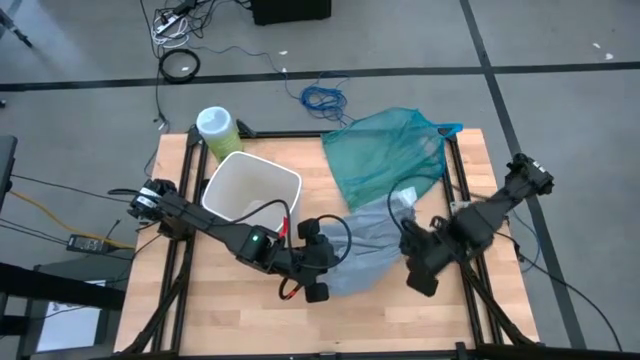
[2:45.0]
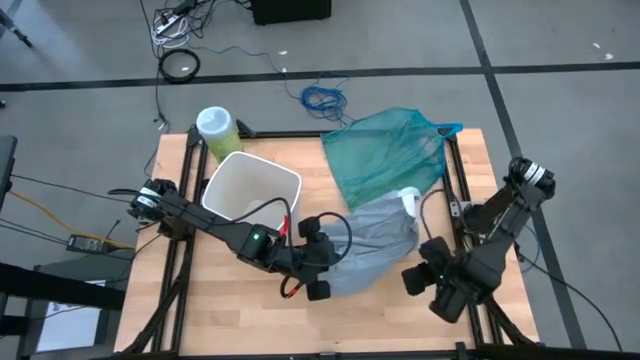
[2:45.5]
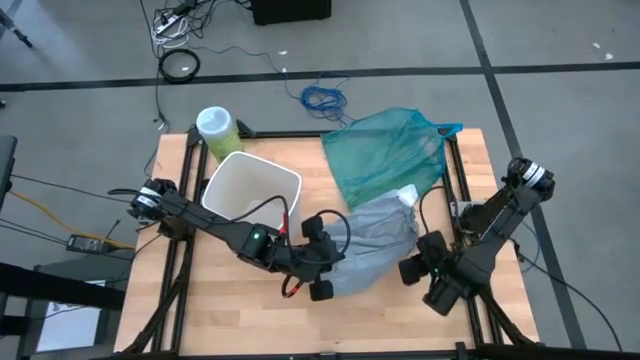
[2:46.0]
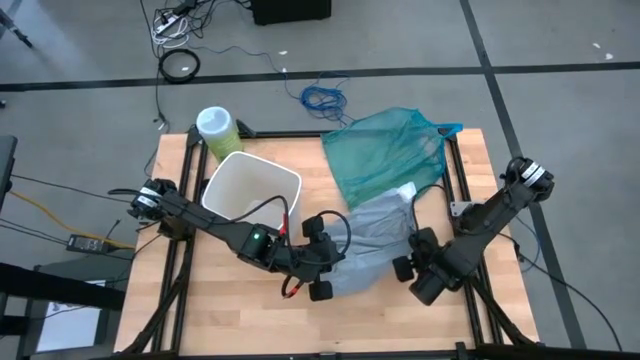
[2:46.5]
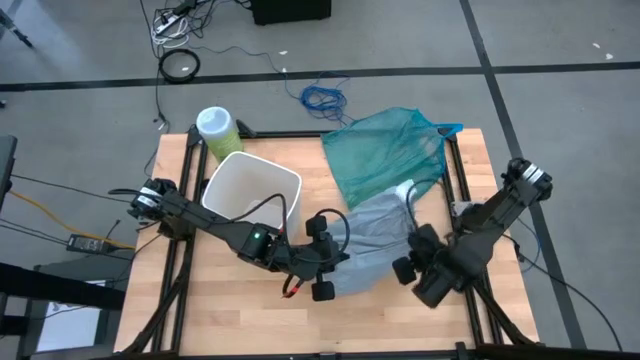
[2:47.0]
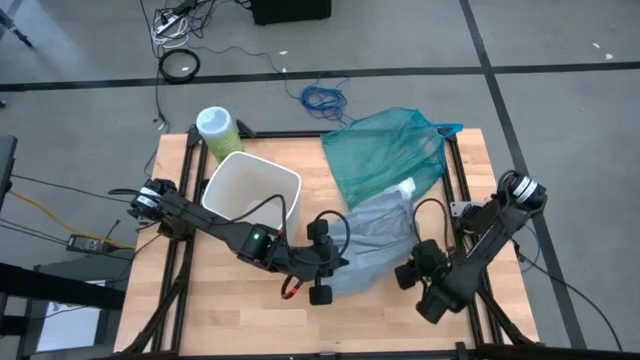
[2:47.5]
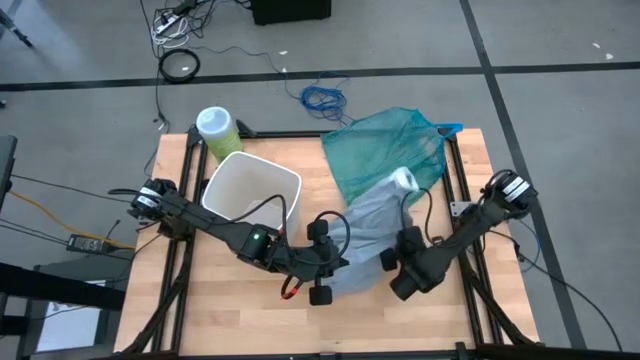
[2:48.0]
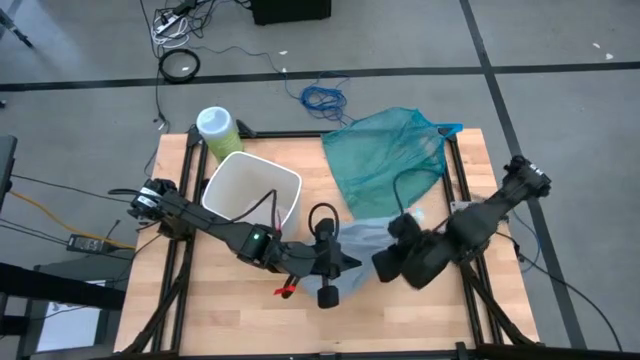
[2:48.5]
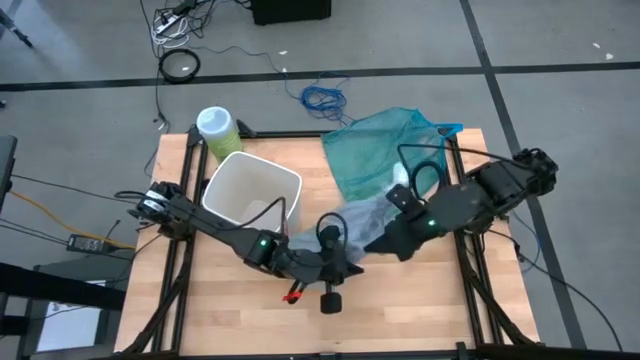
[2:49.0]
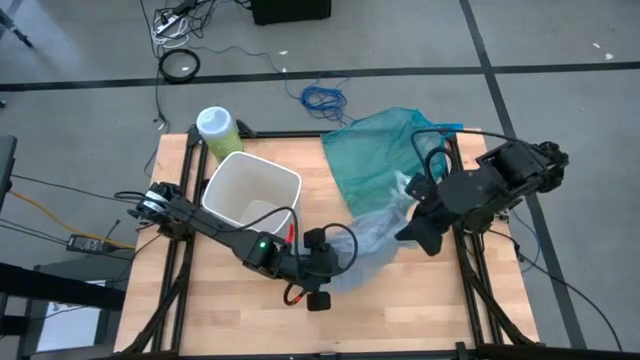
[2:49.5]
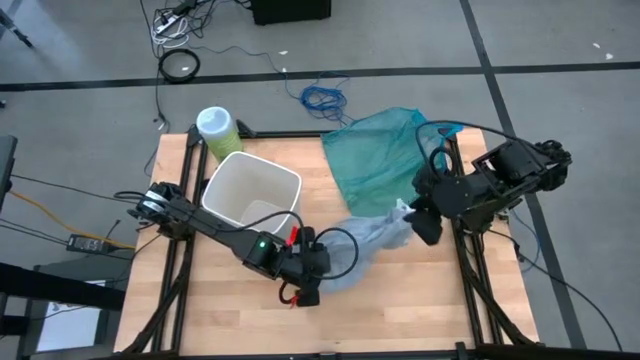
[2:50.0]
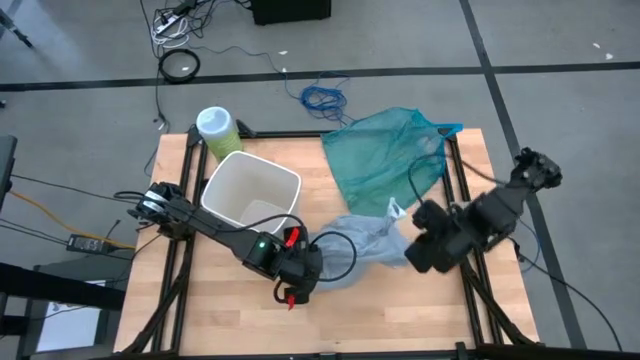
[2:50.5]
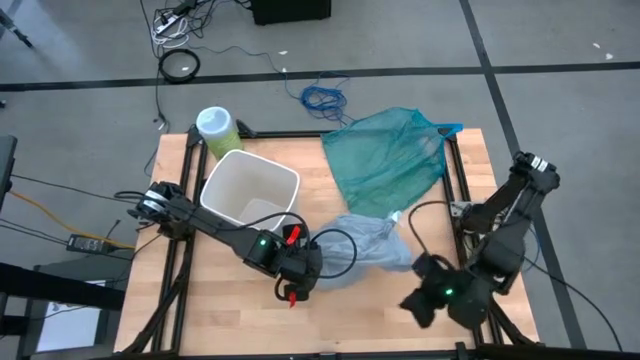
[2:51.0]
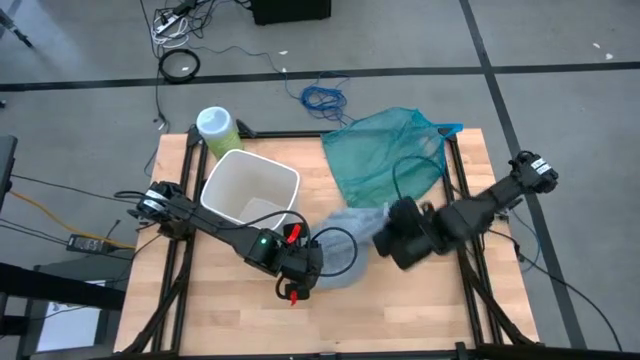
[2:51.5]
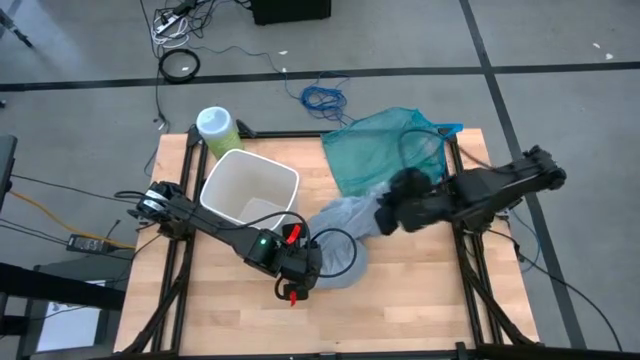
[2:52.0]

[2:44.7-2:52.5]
Task: place trash/remove bag and relplace
Close the light blue trash bag

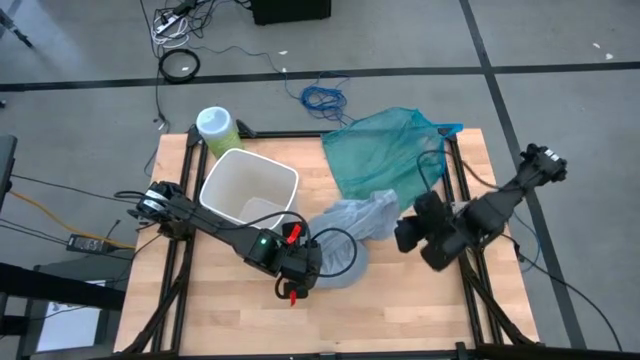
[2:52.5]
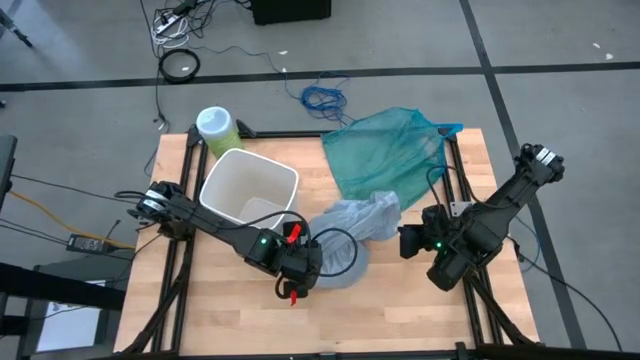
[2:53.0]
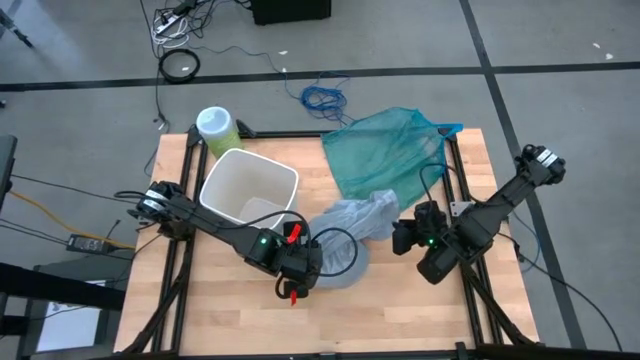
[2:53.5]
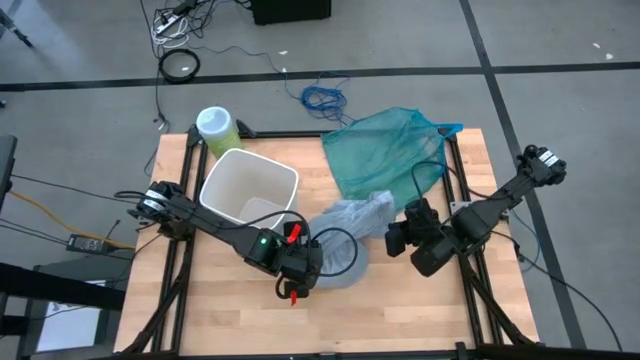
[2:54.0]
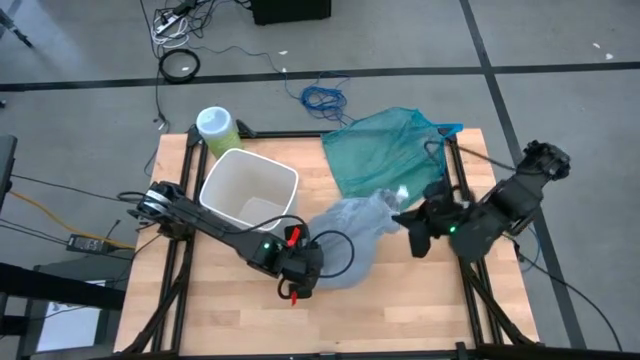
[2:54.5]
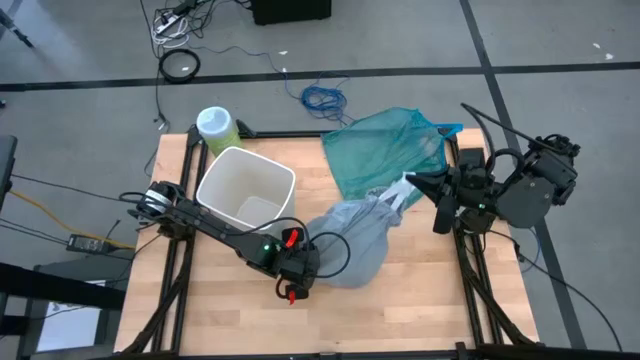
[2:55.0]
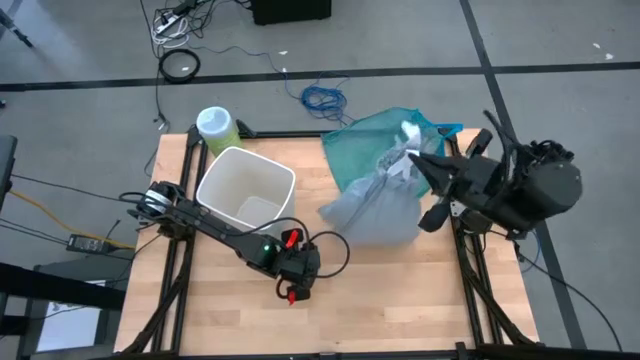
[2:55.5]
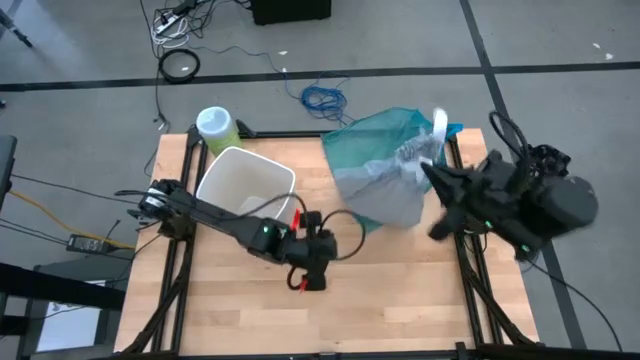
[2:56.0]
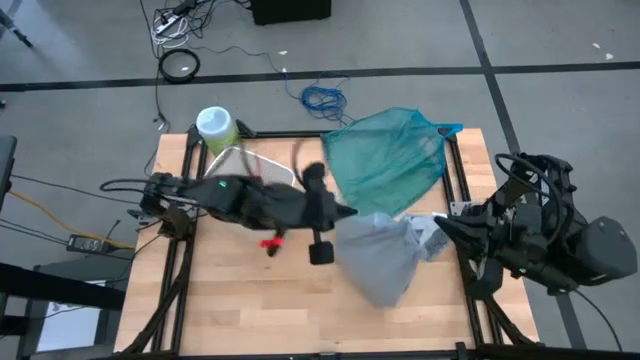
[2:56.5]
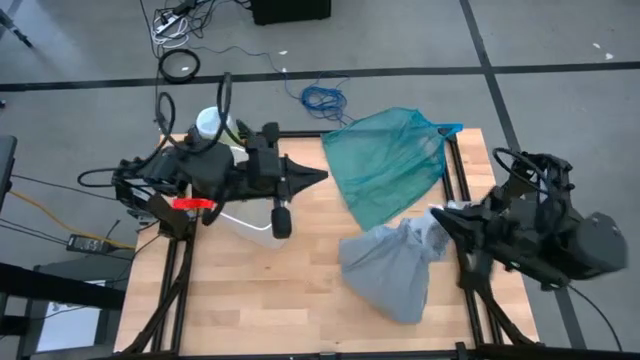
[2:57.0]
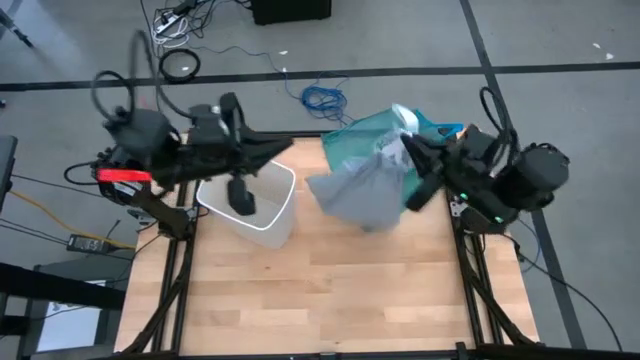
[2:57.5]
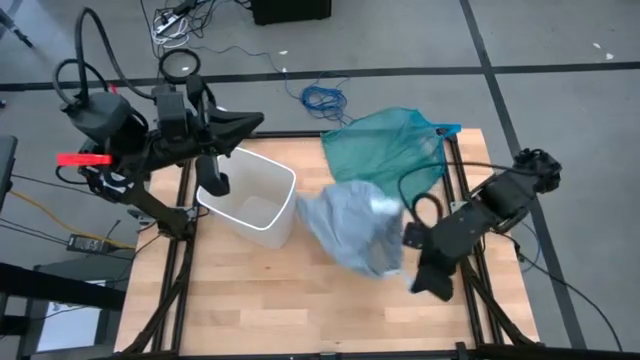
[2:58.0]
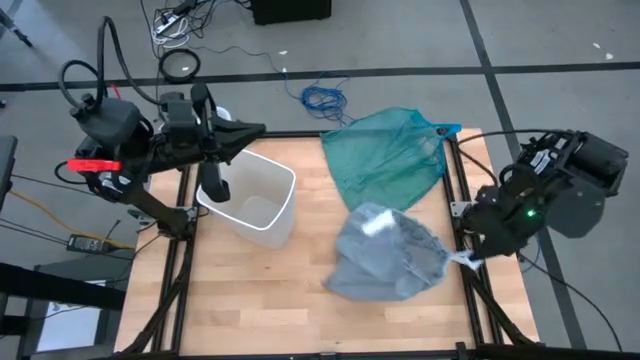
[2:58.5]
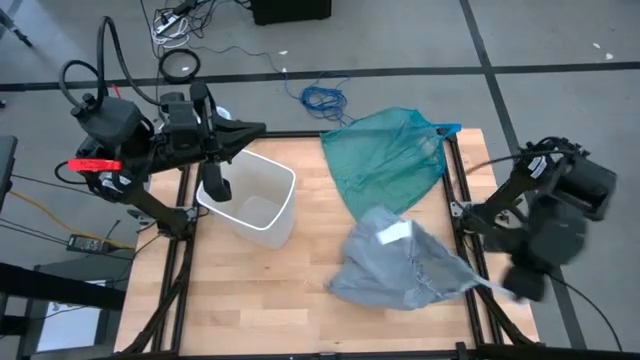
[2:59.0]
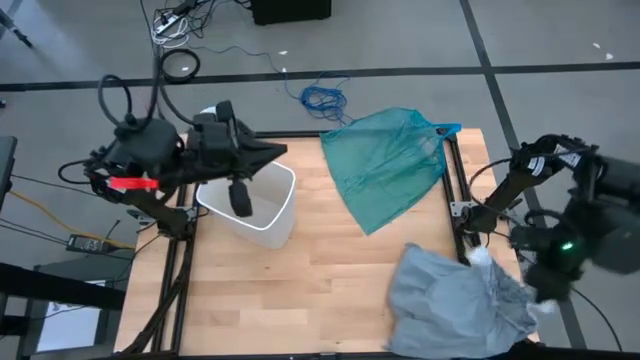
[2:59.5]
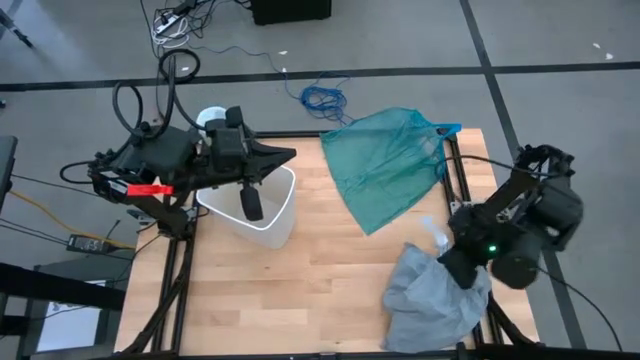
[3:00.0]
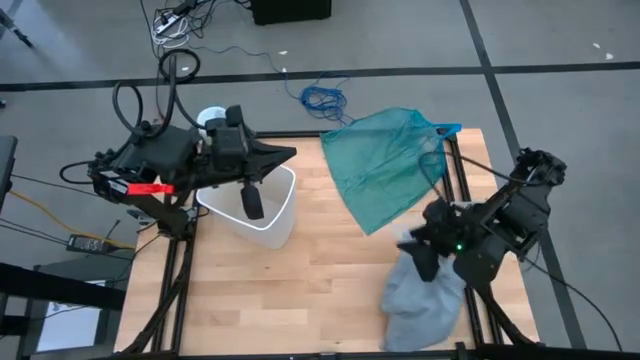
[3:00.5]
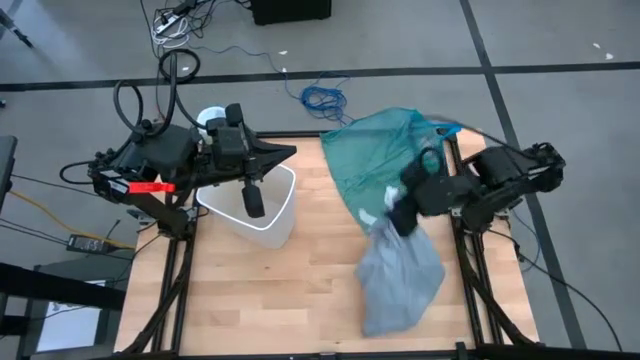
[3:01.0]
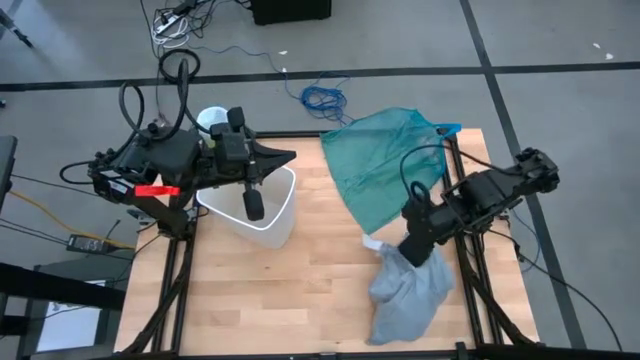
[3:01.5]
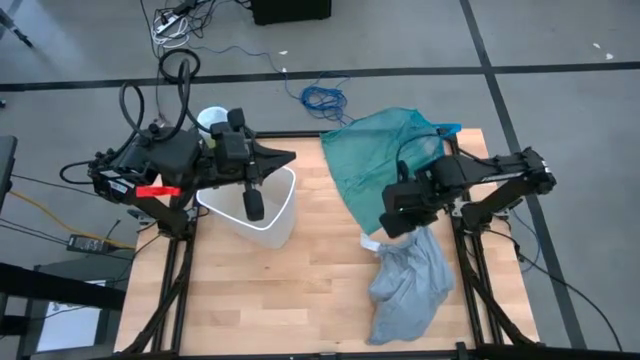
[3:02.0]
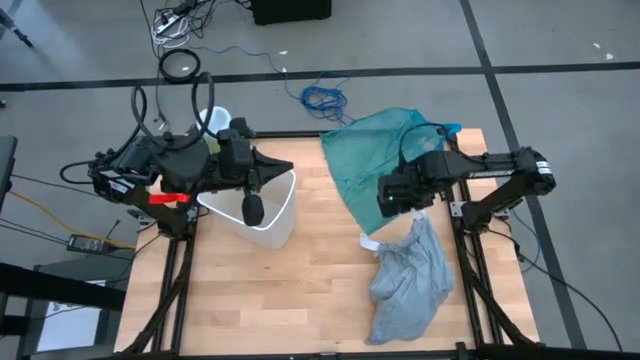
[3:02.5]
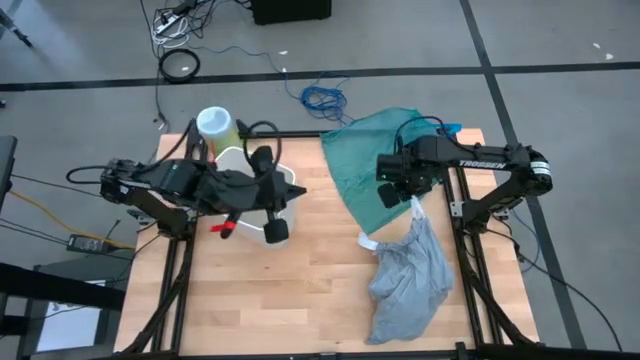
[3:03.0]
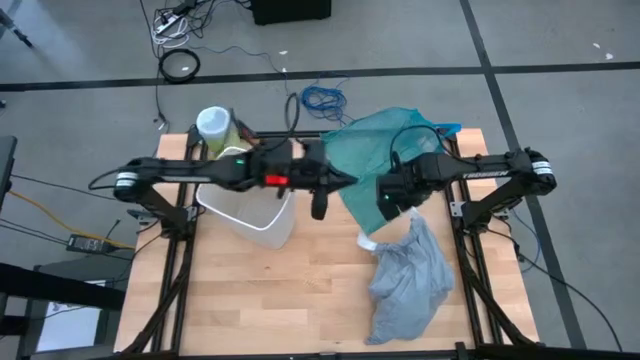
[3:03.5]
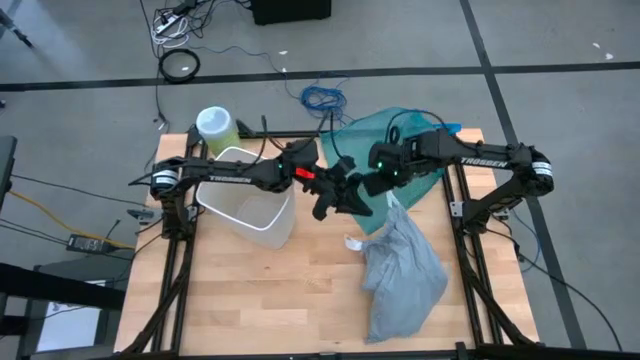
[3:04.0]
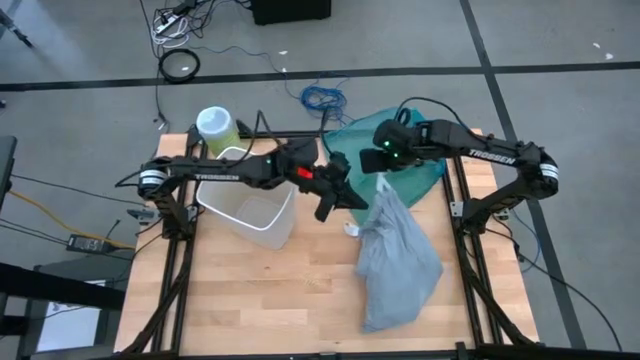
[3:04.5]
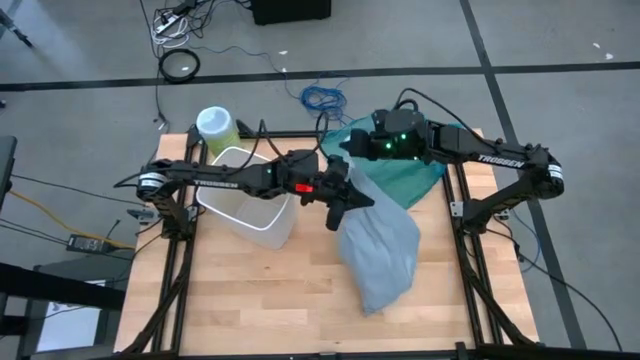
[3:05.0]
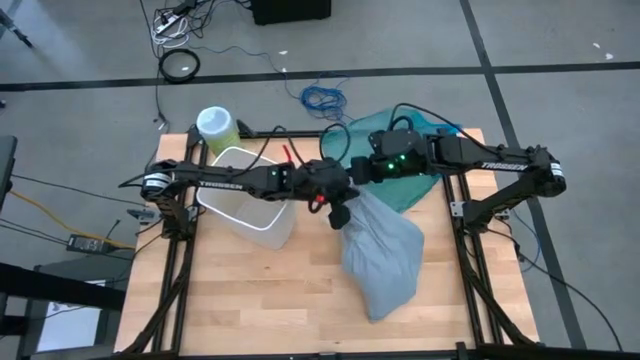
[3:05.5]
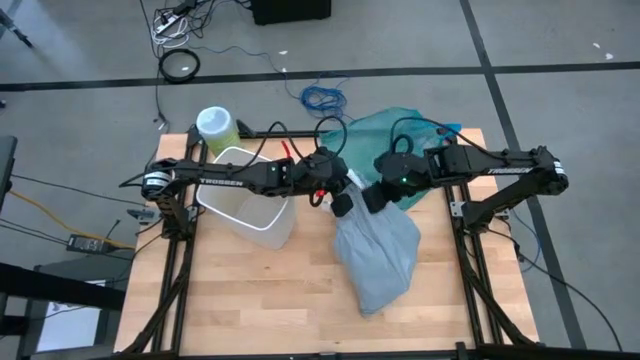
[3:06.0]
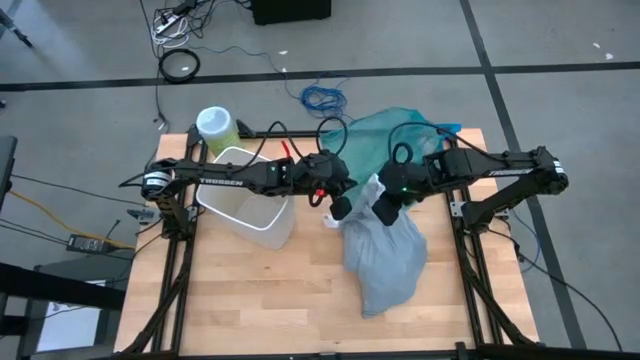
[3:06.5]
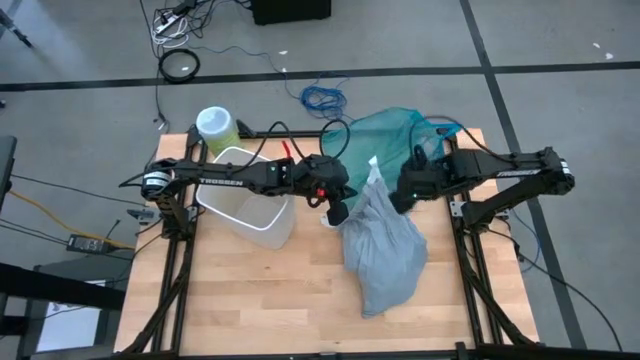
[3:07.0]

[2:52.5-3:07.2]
Close the light blue trash bag
